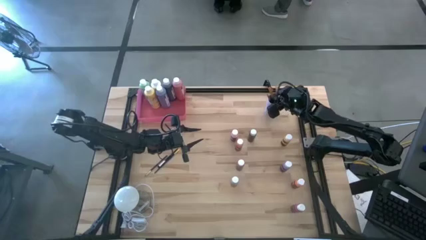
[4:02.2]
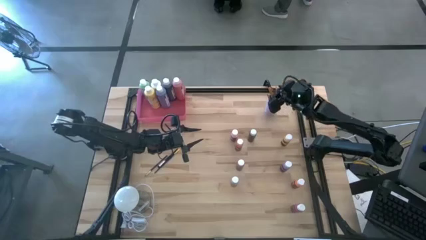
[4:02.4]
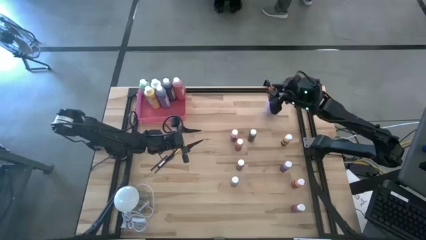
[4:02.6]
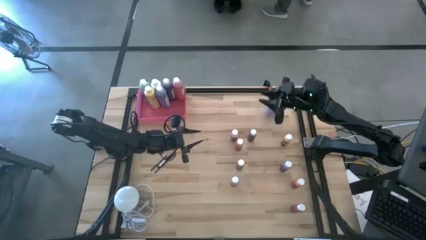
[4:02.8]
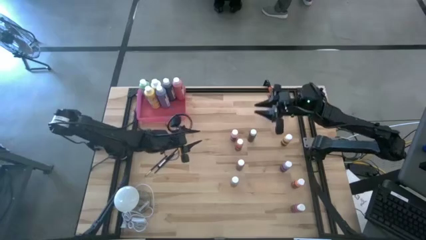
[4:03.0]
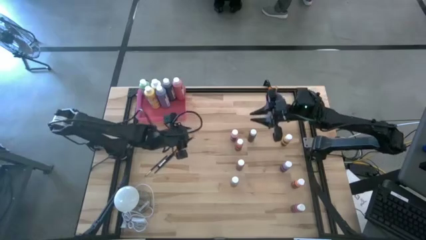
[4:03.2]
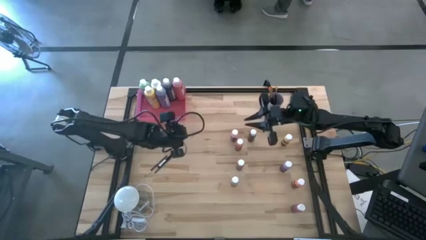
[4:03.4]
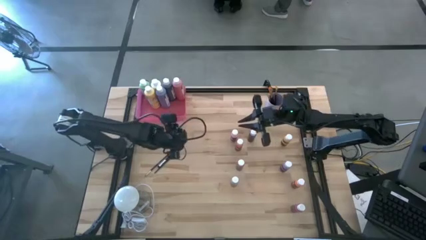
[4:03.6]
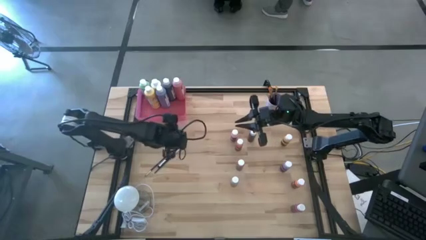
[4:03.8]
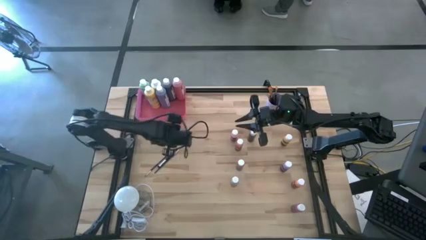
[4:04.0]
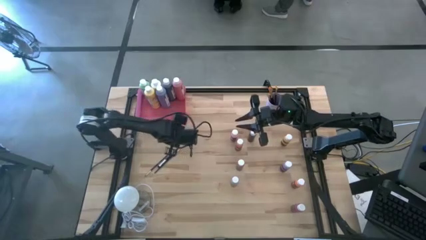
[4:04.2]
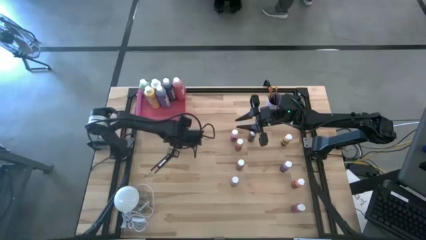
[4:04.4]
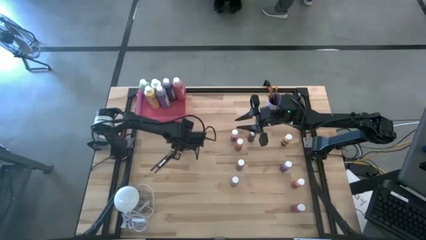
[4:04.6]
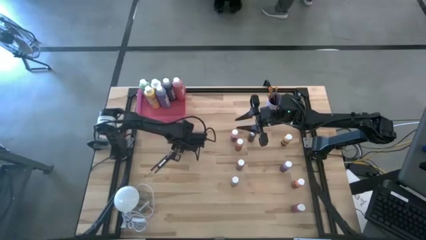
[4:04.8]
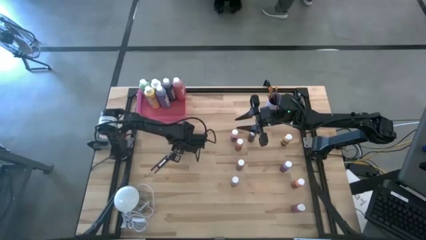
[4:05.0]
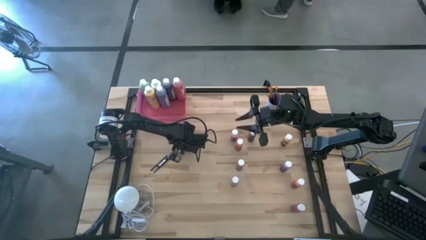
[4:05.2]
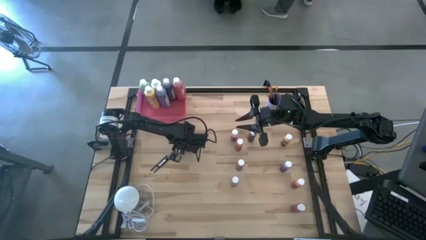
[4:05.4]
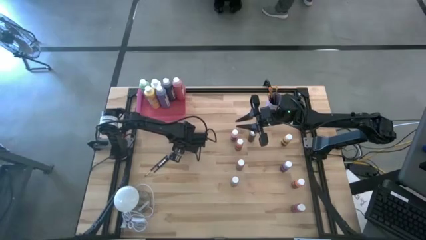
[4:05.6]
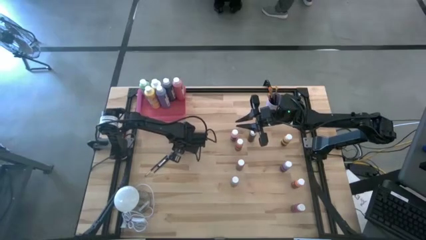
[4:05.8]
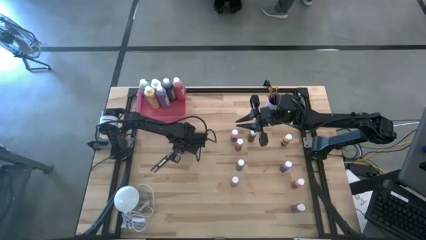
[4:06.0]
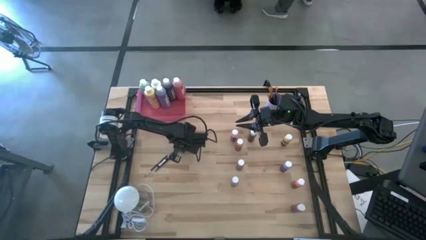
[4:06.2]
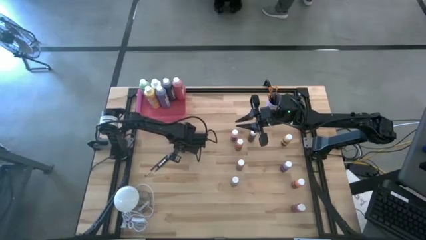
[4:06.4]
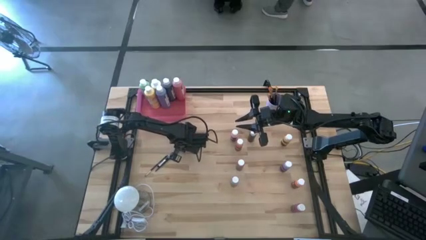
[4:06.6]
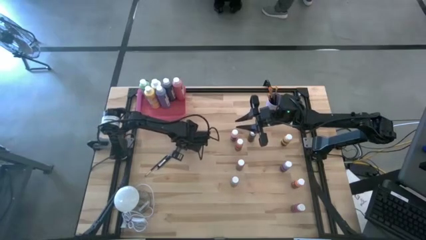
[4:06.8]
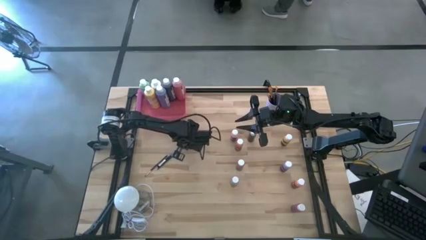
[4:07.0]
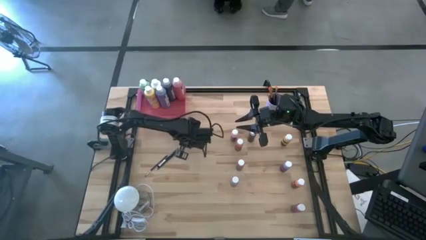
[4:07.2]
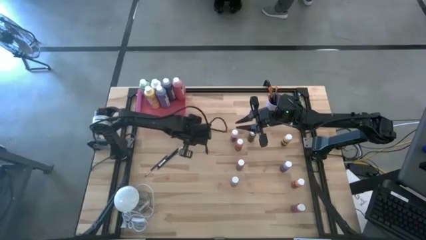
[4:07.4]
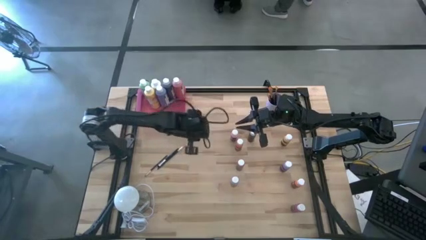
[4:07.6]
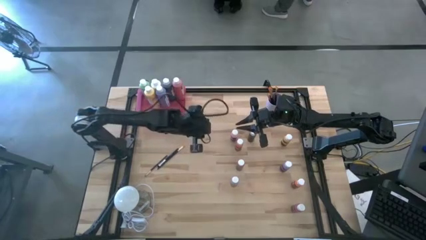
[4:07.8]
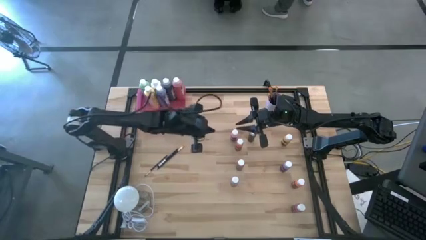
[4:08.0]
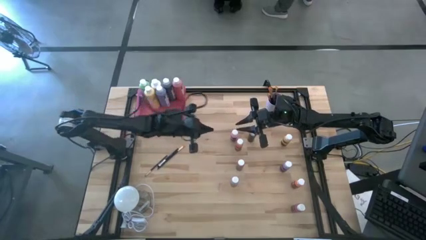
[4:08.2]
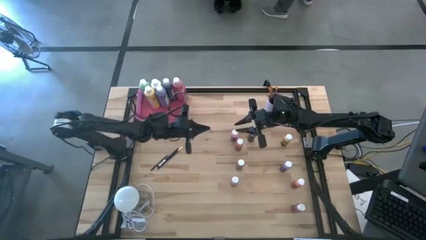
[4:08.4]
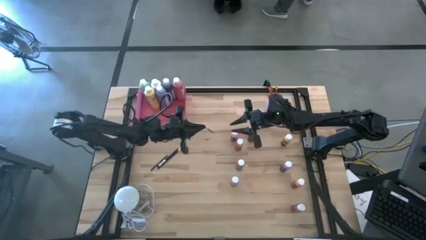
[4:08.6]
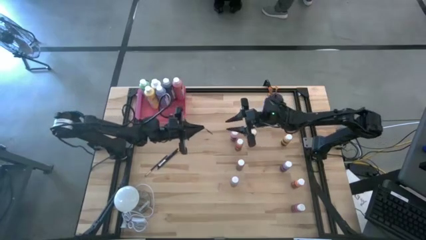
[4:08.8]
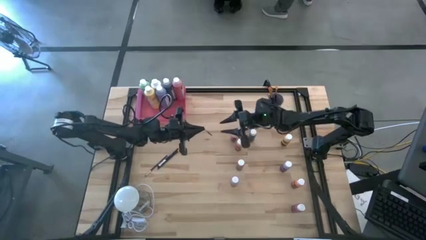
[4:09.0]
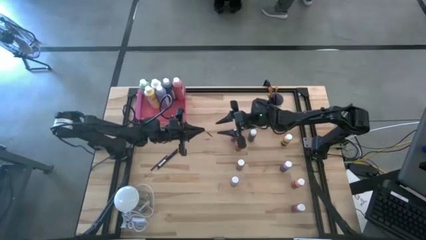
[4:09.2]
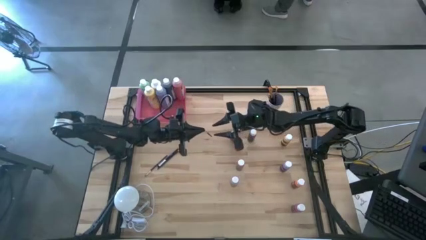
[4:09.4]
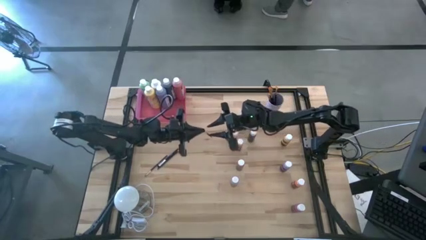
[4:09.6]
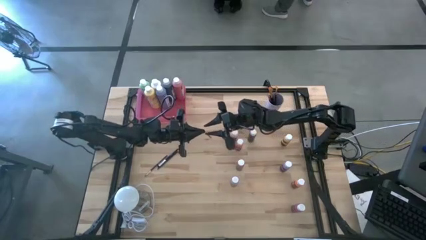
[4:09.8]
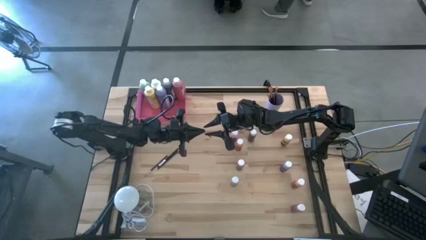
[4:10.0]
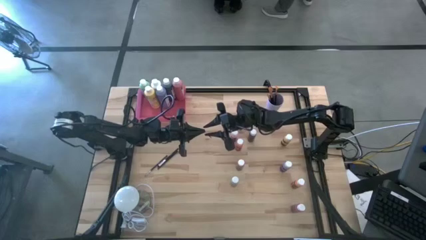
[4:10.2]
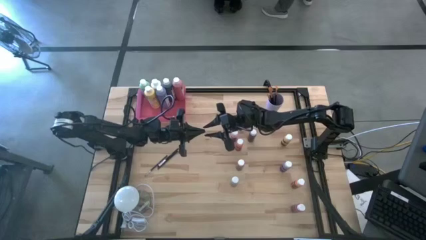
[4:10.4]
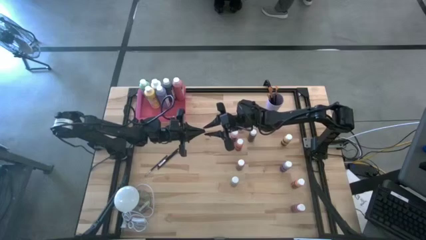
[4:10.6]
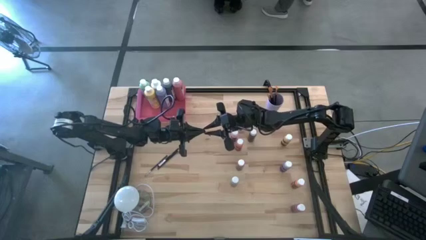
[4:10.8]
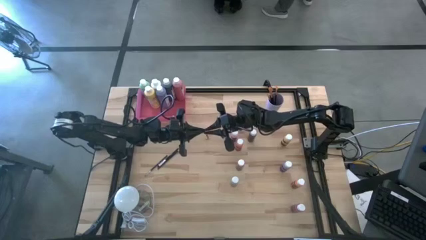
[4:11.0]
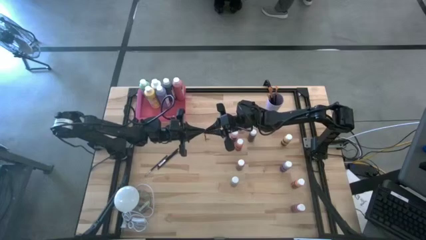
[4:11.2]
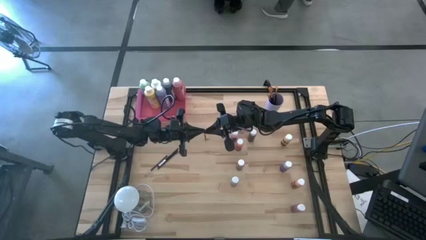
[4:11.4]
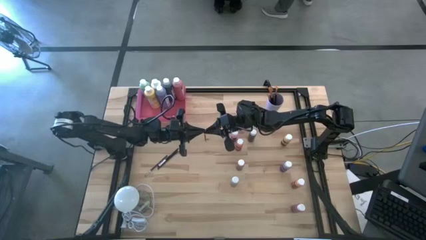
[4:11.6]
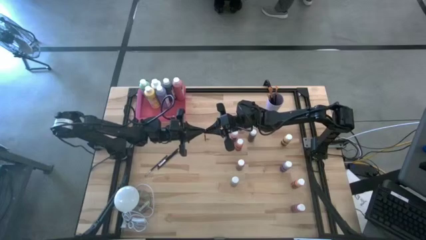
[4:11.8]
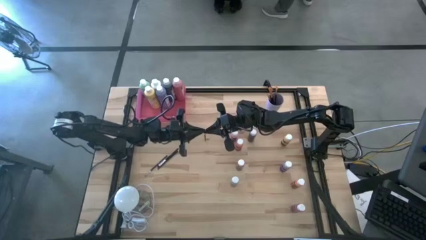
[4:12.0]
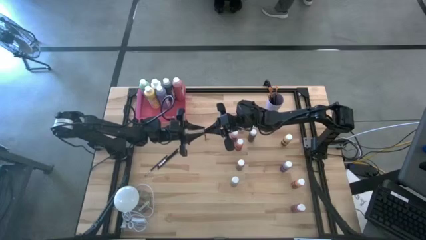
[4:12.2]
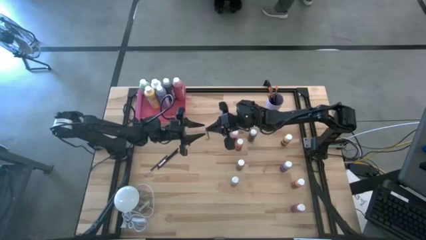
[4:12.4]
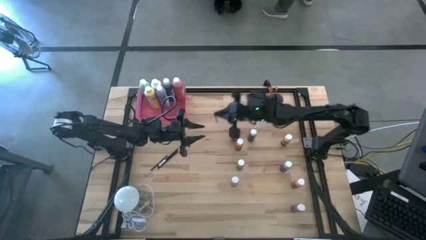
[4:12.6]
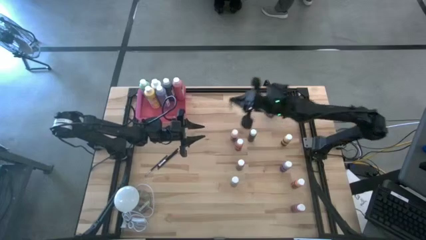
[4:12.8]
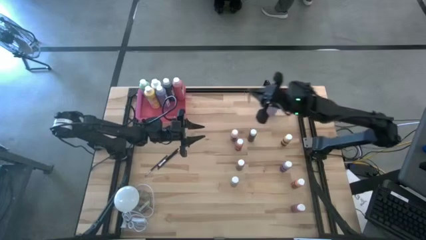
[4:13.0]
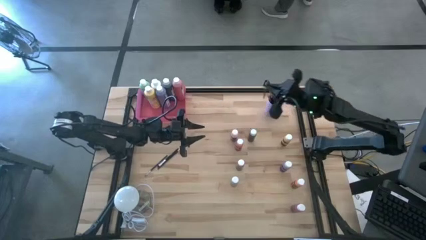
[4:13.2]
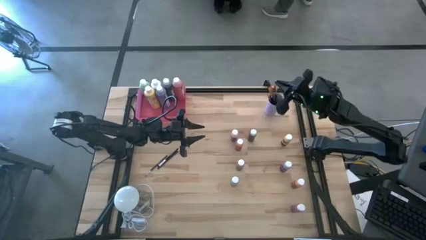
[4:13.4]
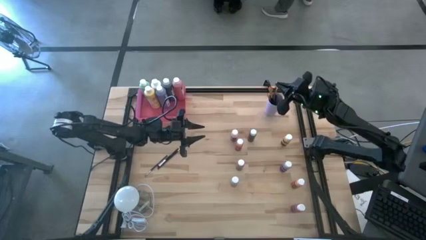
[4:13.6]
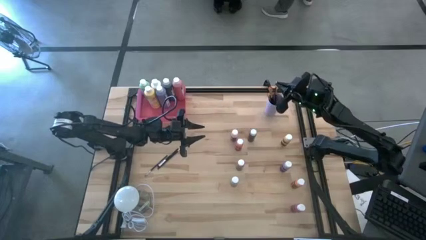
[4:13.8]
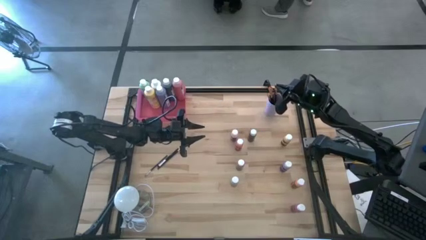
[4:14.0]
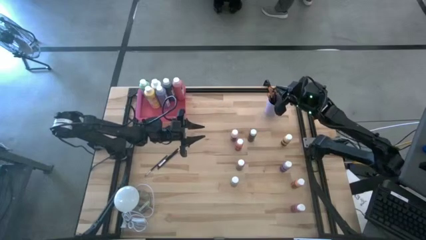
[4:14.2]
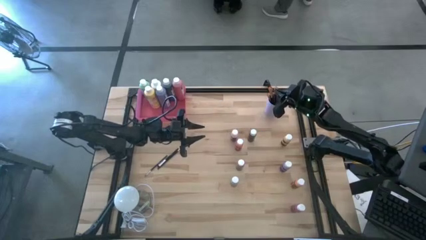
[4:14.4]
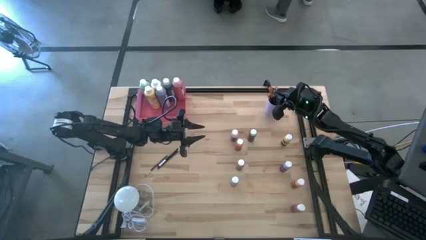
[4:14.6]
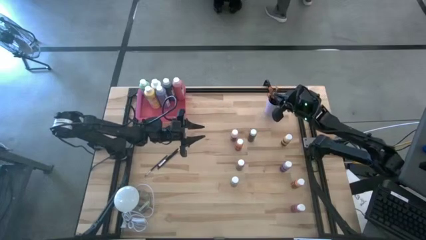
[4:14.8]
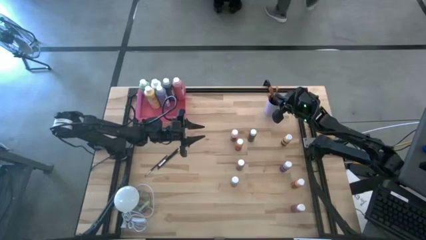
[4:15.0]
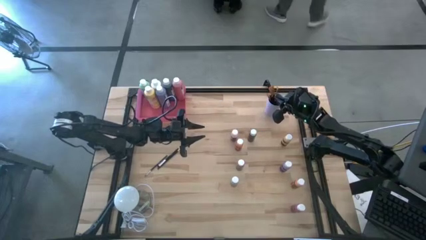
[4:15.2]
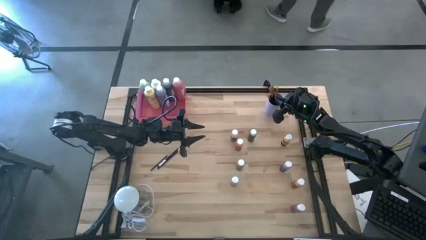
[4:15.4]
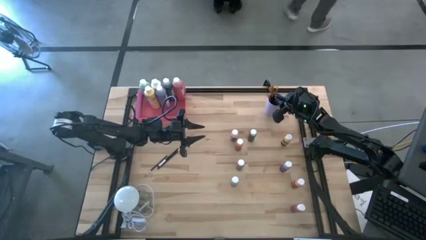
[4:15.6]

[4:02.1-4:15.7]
Task: Pick & Place Paint Supplies
Put the silver paint brush into the purple cup

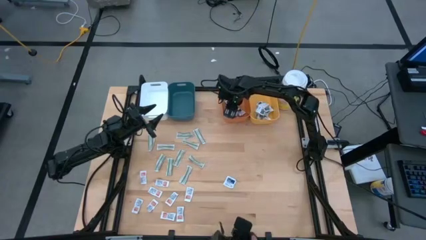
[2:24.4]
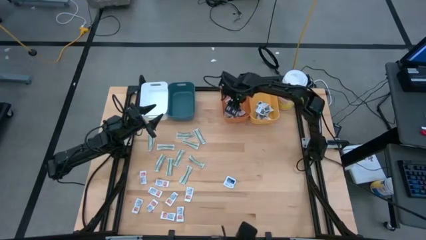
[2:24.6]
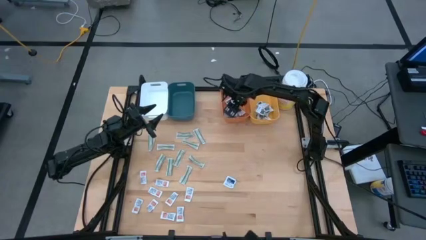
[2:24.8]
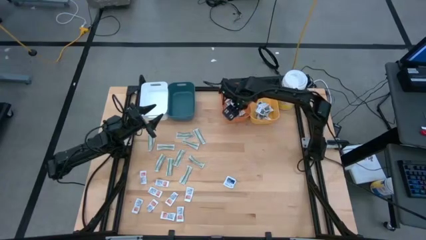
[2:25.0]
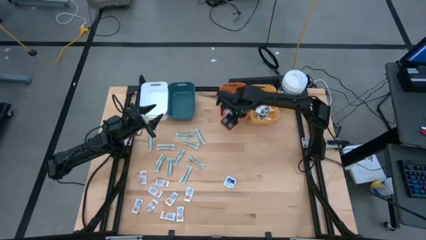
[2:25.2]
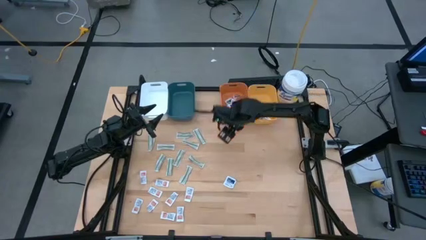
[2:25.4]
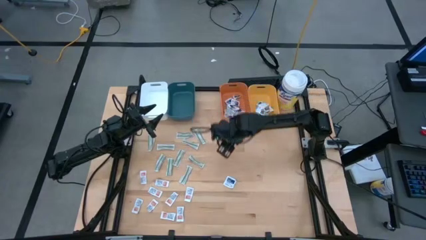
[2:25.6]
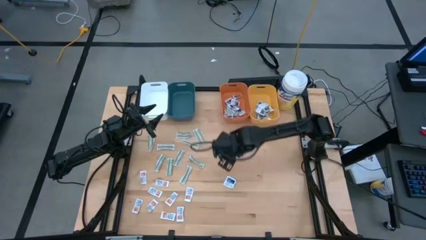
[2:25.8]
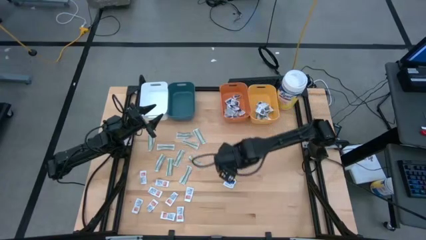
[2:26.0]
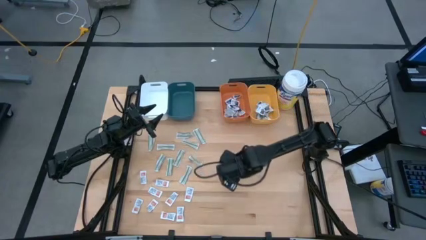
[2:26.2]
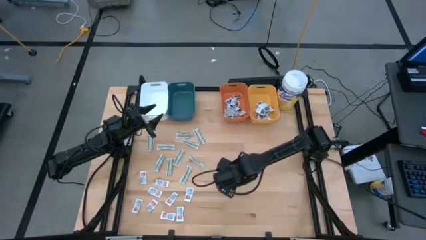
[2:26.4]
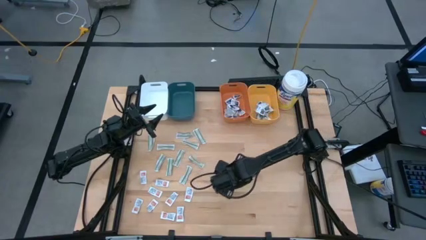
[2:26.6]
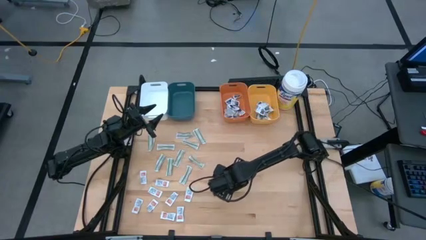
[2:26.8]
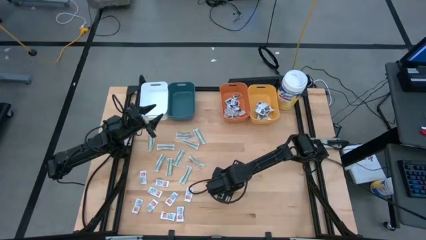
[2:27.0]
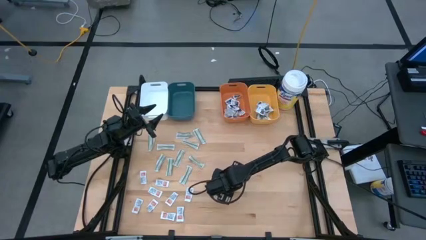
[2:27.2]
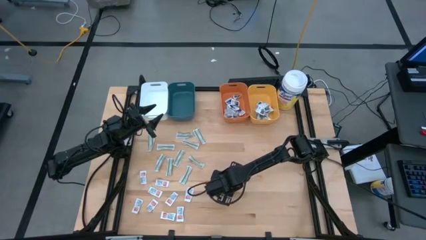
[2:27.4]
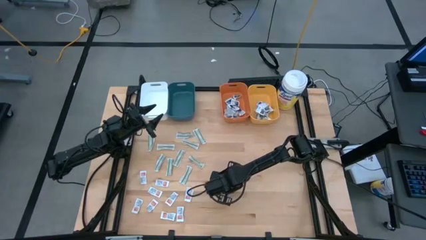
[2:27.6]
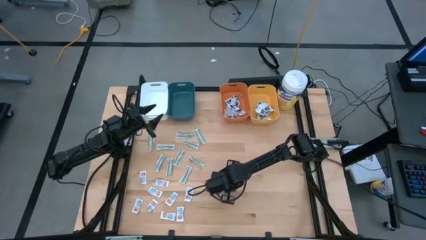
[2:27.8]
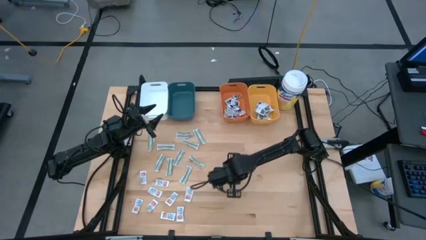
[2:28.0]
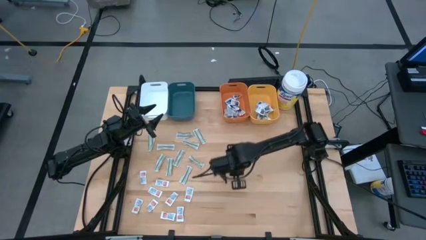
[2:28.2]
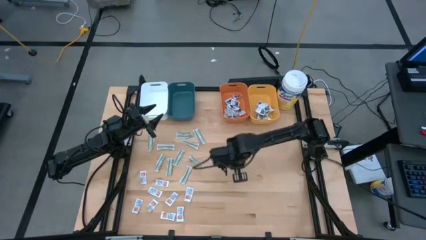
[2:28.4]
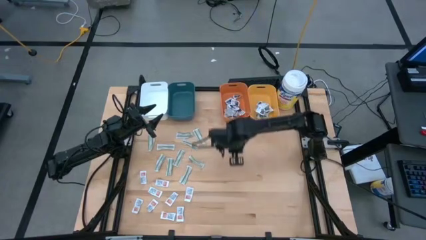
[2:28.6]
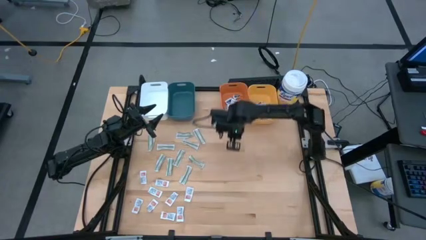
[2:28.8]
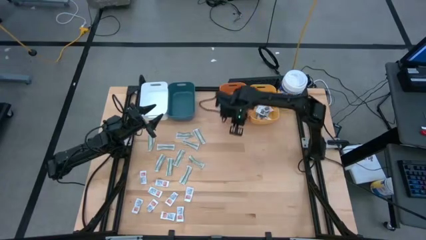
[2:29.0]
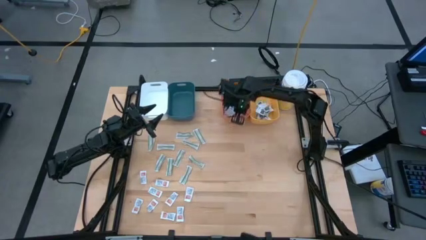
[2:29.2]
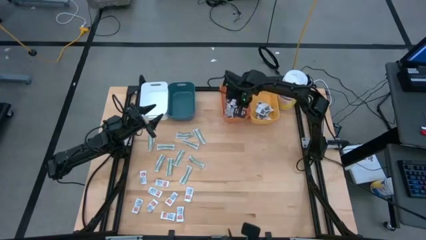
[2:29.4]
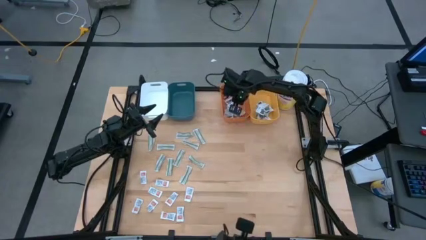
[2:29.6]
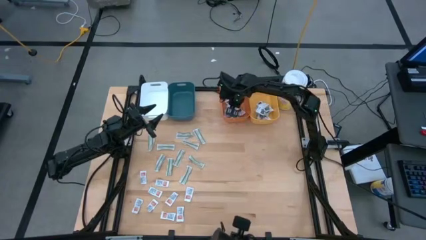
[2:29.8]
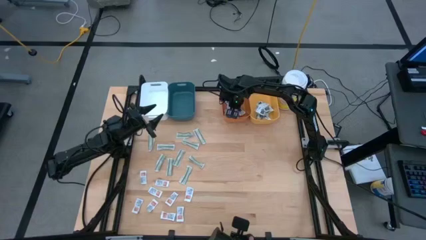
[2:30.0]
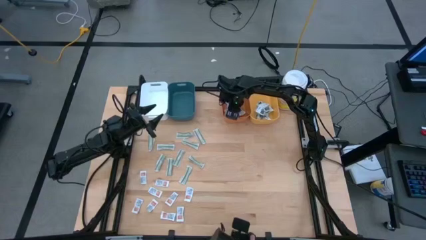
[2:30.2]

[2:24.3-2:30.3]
Task: Pick & Place First Aid Supplies
Put the alcohol pad into the orange bin
